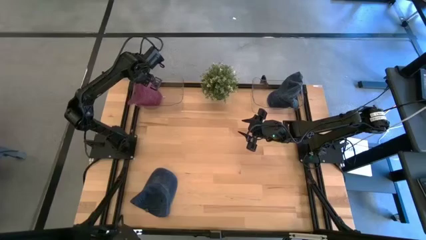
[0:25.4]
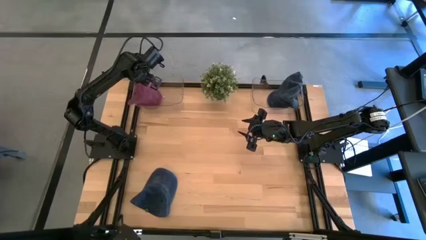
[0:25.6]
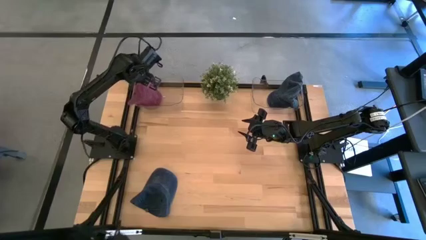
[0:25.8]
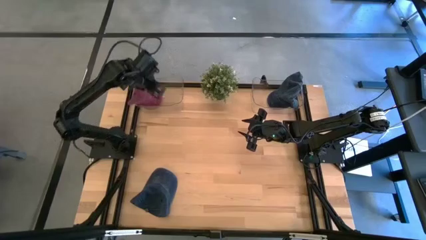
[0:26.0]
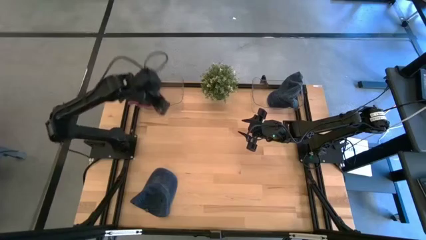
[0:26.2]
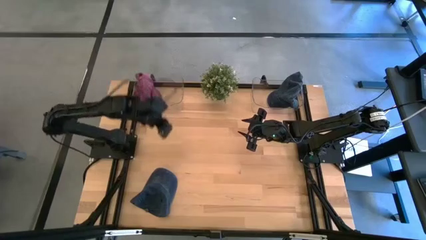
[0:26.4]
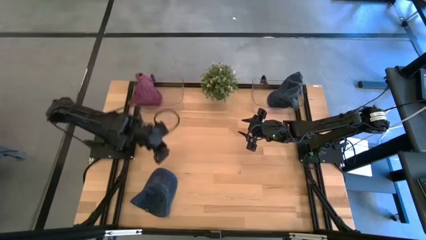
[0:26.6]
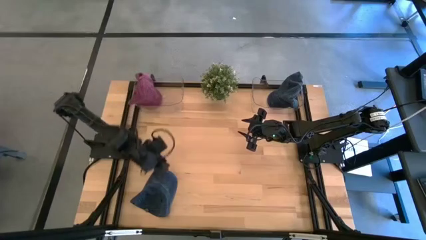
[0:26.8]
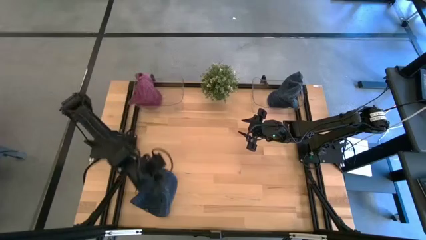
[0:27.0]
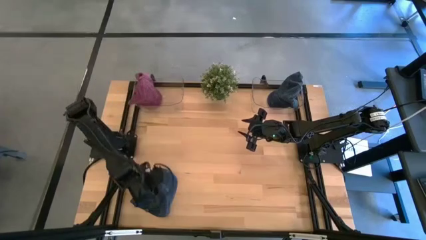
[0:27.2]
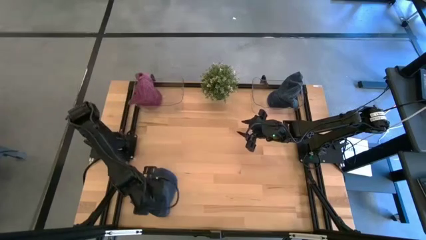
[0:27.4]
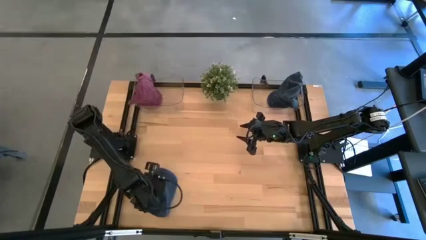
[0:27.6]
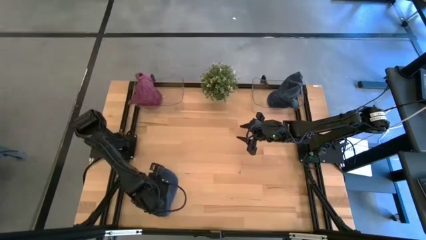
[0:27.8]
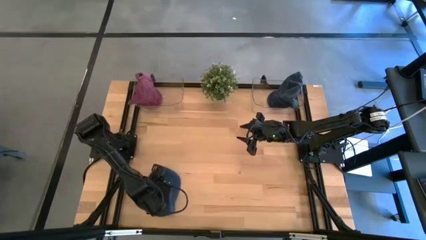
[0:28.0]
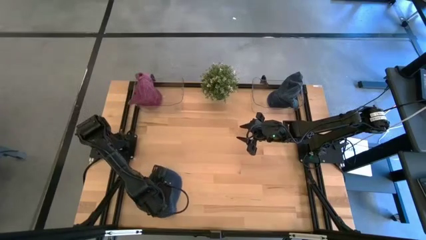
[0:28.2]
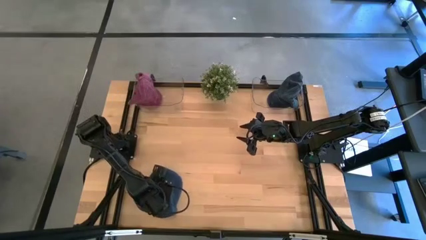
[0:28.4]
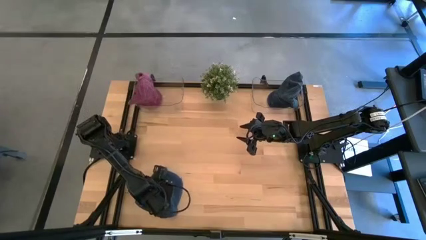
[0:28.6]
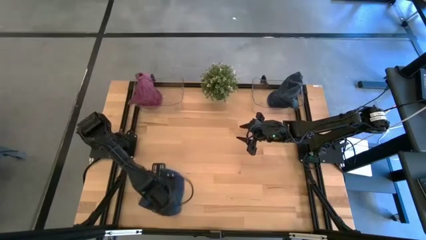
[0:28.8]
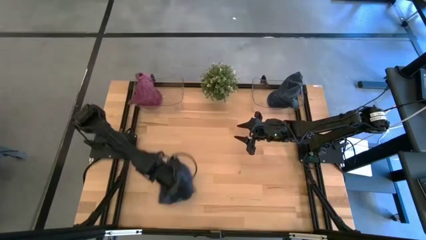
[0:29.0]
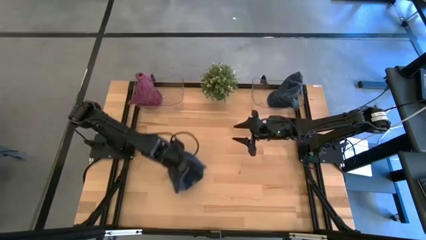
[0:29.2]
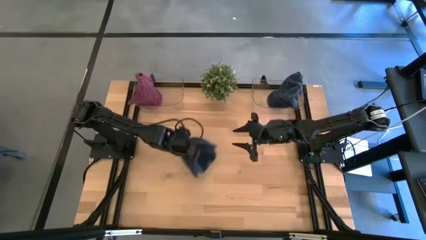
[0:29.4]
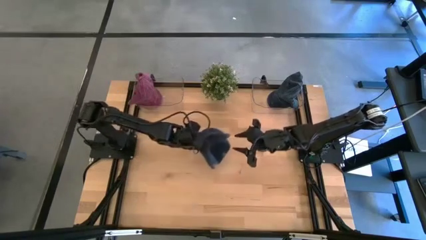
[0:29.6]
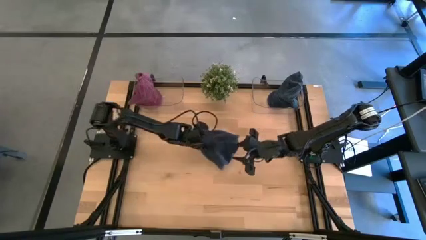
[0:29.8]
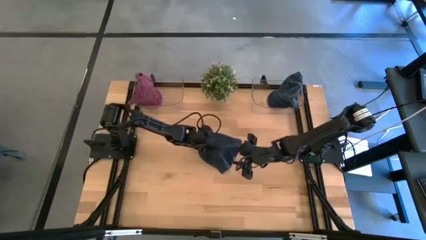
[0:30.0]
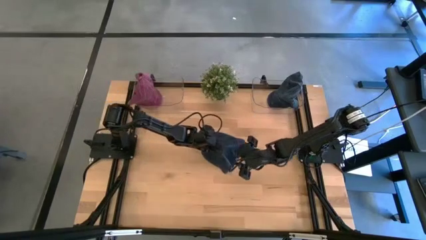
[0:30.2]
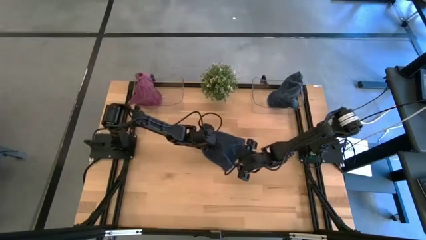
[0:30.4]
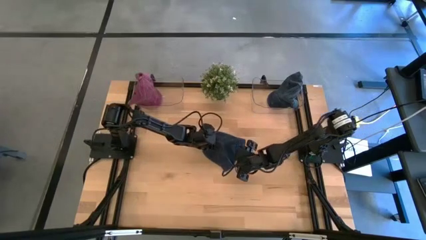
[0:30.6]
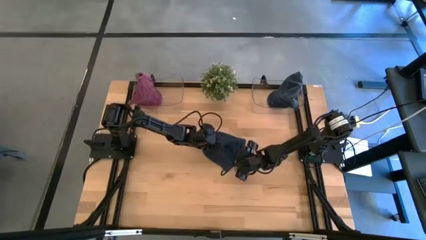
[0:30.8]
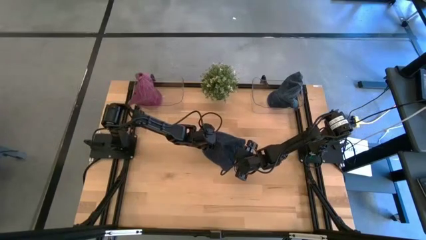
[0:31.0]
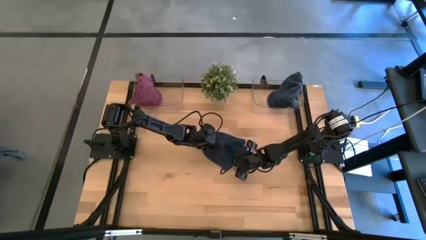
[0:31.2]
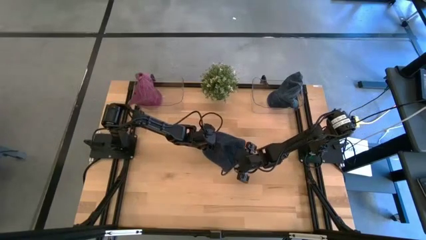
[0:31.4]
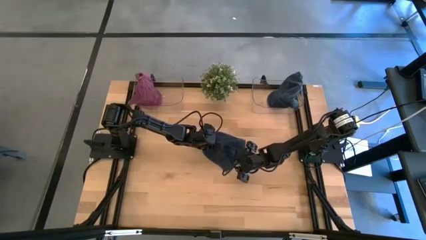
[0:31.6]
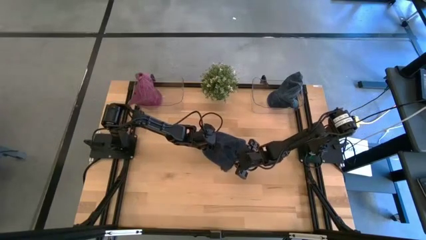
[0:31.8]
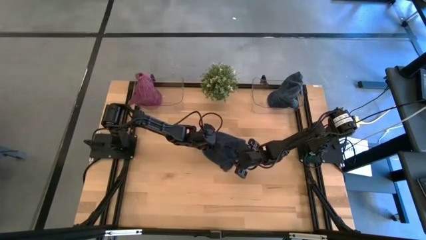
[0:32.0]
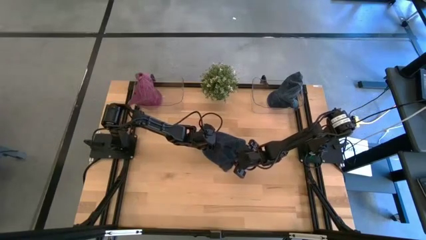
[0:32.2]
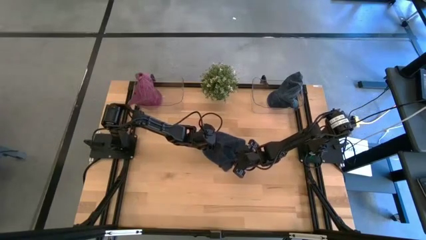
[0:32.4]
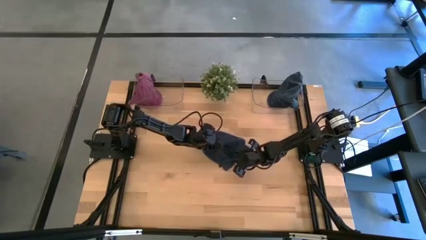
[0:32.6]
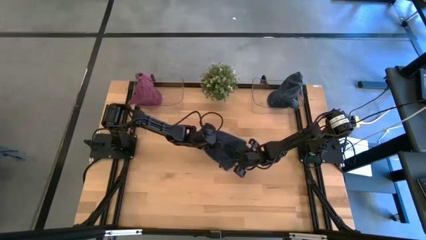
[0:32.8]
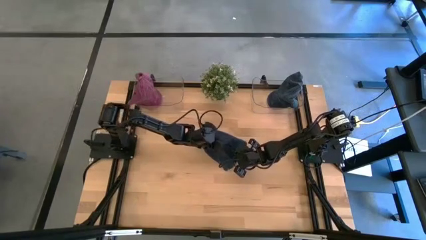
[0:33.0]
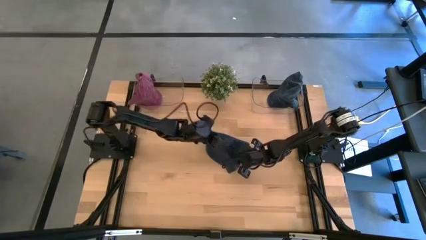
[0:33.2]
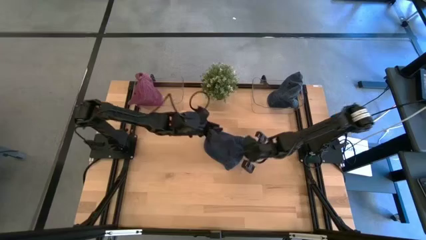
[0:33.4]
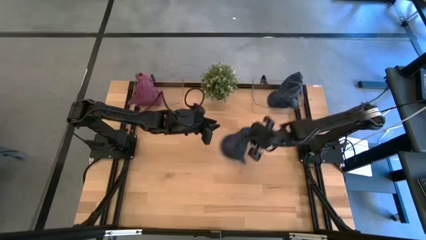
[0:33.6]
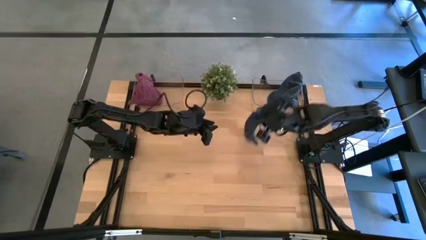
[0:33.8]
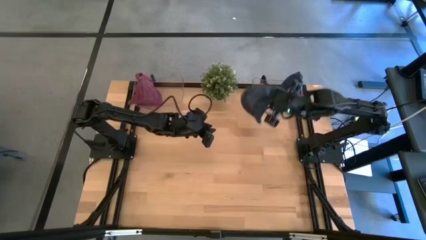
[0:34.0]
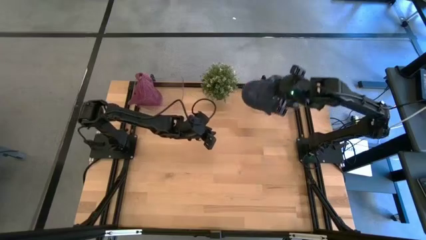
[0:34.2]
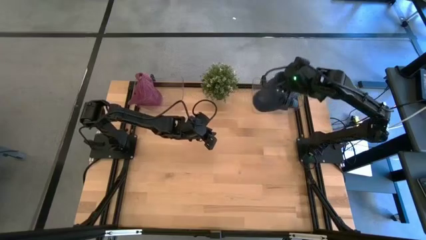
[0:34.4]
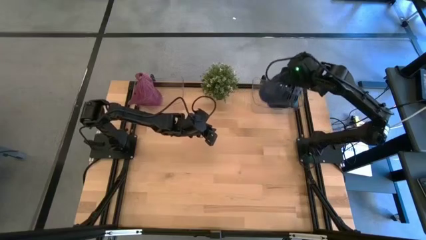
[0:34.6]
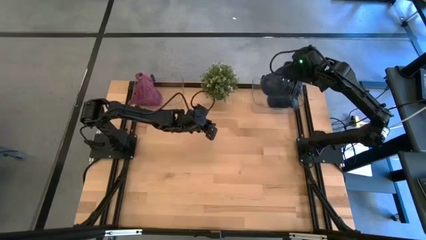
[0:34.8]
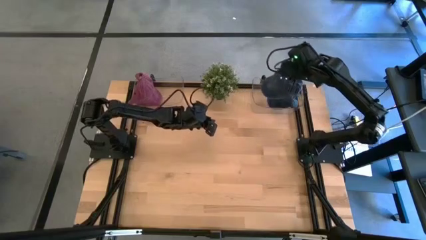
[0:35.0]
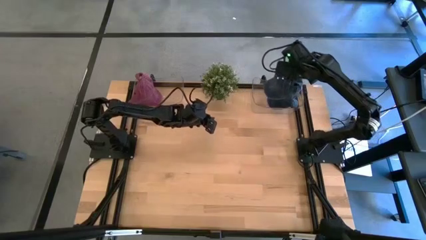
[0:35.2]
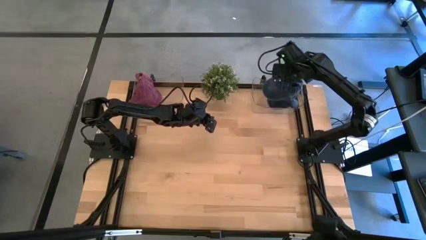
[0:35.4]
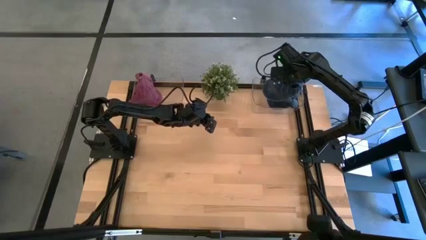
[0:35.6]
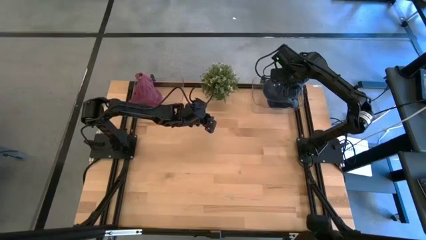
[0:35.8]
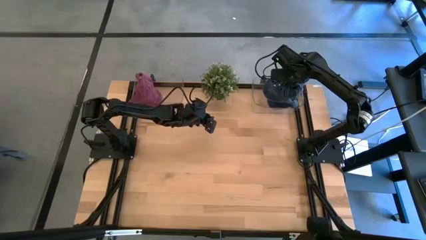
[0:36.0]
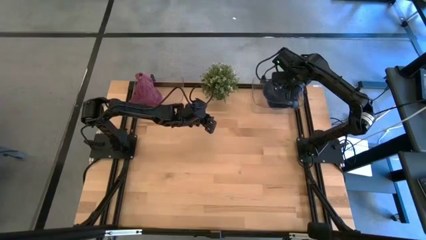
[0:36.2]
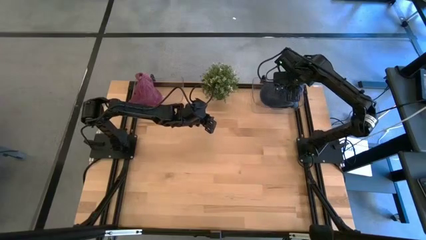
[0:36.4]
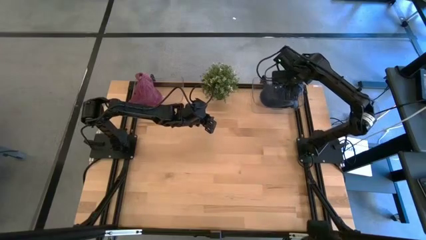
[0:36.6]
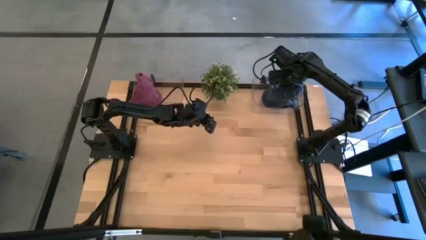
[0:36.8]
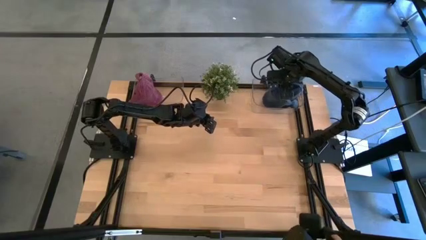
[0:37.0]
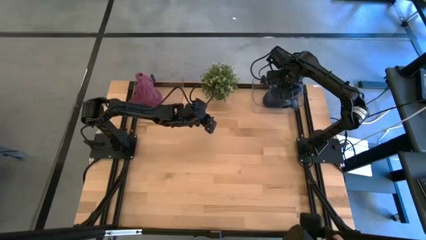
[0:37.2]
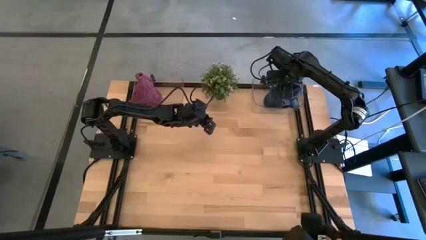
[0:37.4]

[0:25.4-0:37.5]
Task: Pick & Place hat
Put the blue cap into the right transparent bin

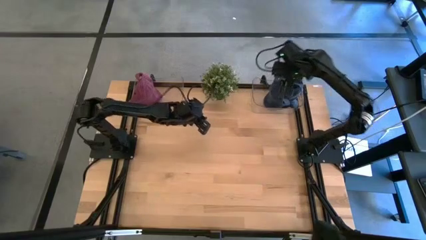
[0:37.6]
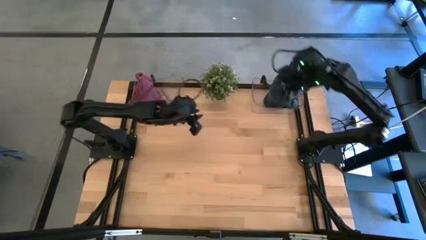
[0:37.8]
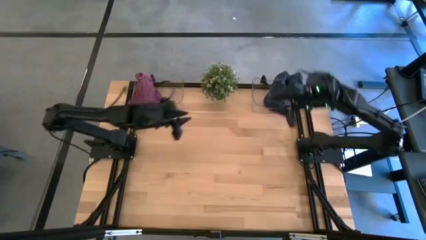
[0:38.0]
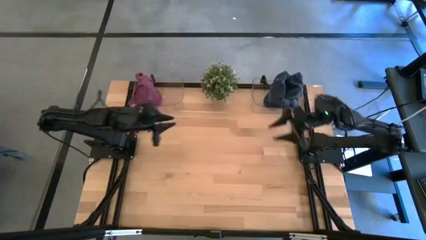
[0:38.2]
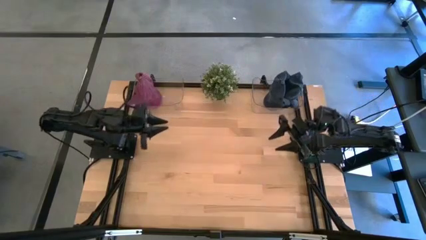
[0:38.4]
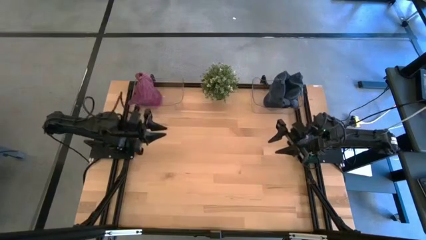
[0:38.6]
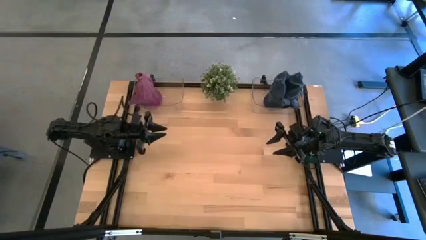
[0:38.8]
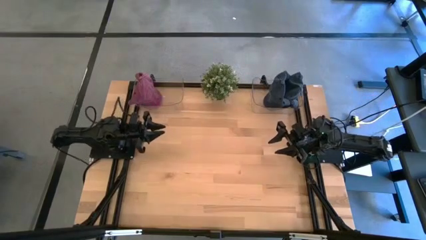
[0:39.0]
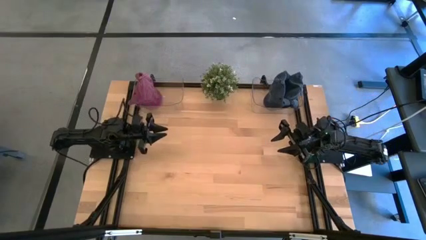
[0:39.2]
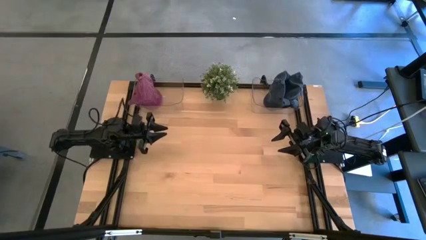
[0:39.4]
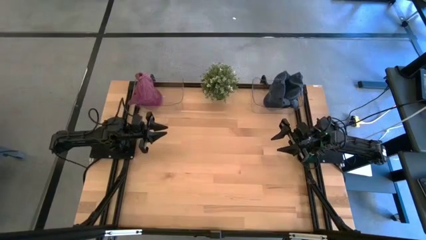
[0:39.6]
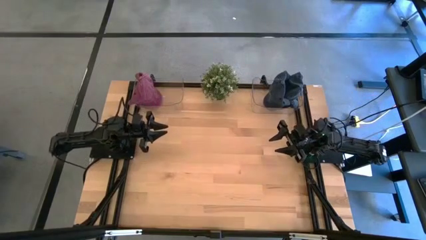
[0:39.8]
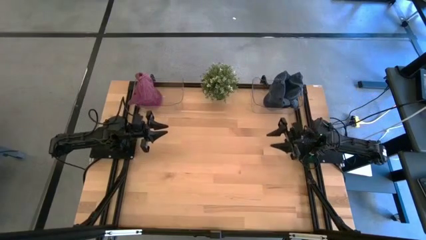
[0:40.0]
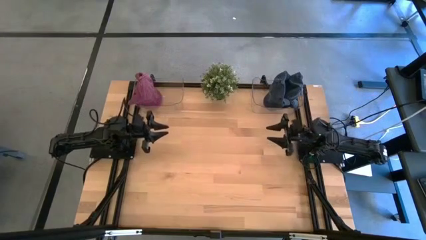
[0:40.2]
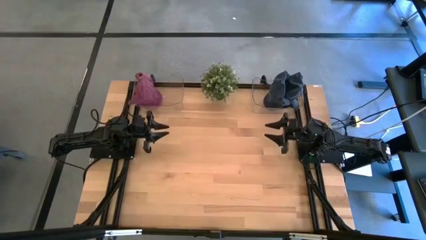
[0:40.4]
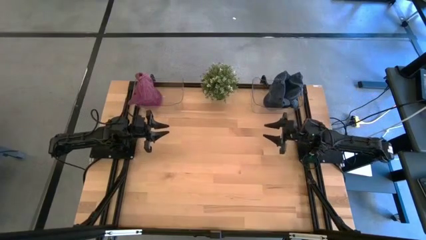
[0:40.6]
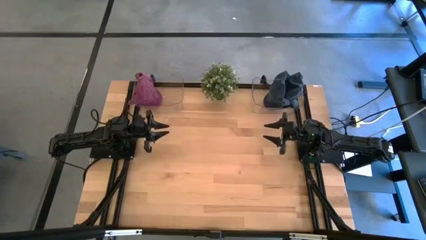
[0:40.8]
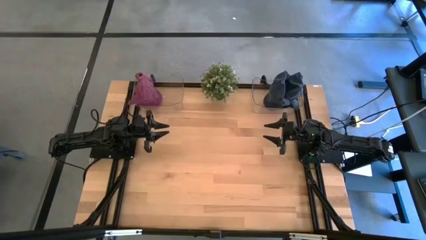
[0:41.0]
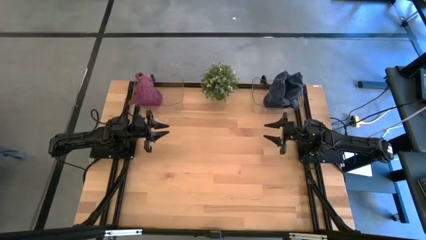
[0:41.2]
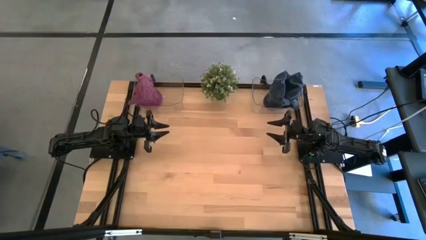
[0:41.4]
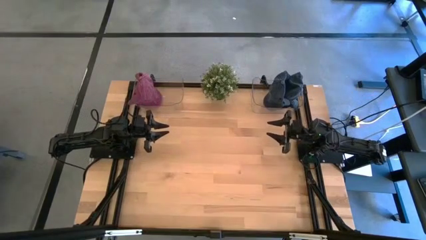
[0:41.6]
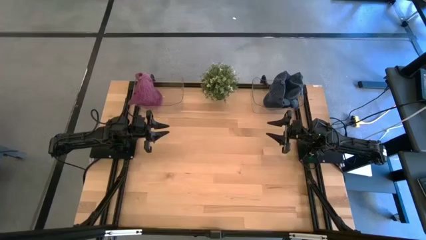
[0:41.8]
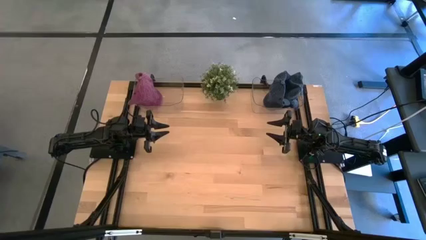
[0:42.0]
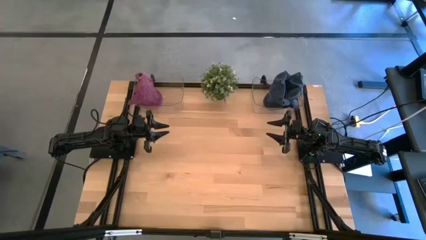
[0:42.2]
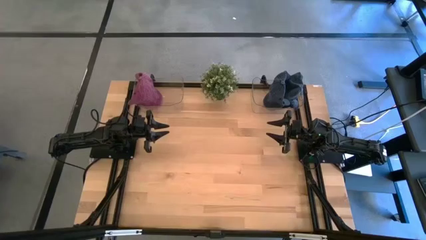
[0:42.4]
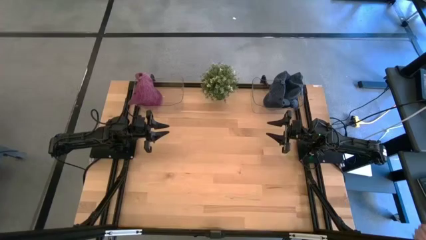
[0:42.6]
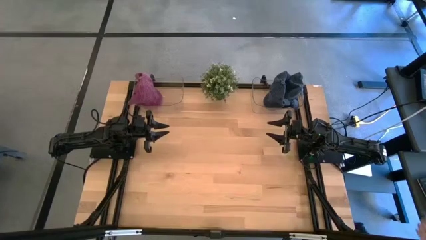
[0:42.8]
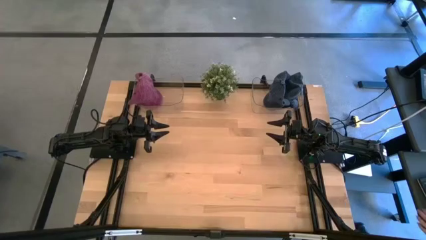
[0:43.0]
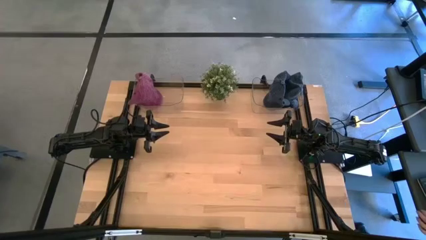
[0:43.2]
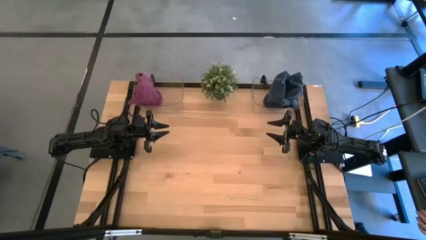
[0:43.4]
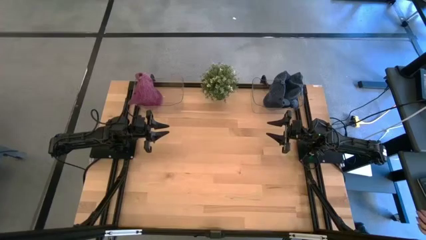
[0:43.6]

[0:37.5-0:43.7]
Return to home position
